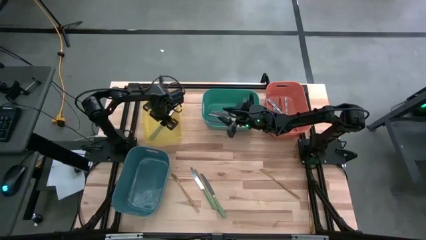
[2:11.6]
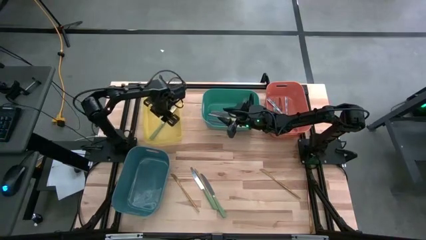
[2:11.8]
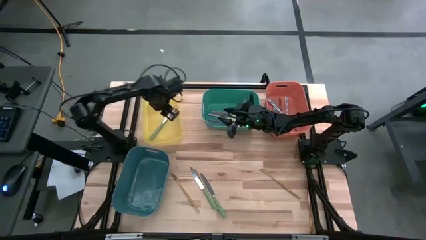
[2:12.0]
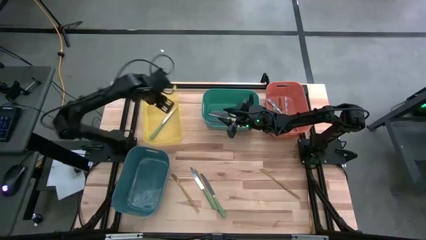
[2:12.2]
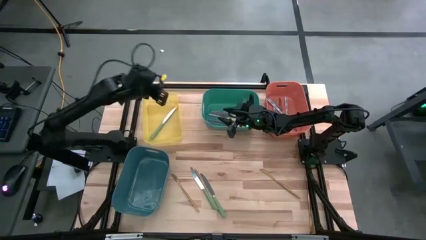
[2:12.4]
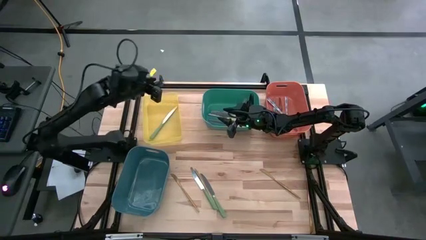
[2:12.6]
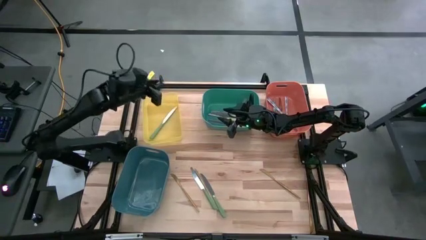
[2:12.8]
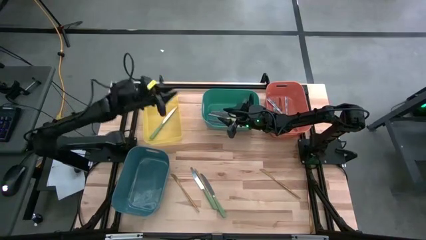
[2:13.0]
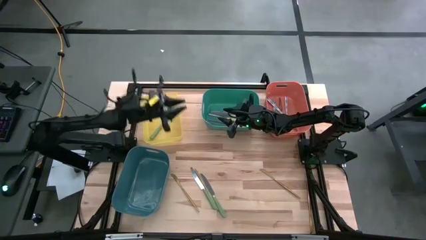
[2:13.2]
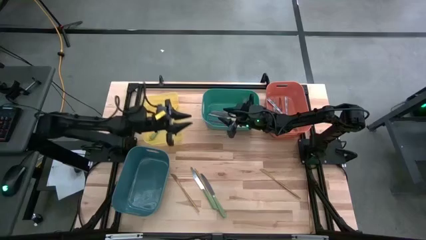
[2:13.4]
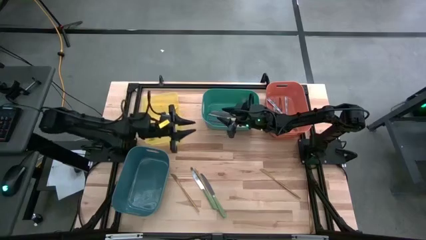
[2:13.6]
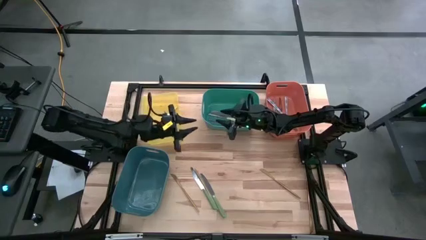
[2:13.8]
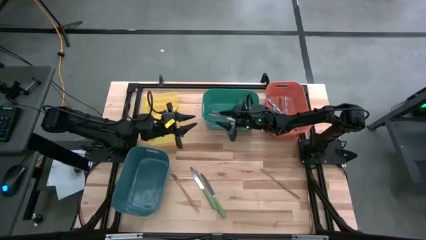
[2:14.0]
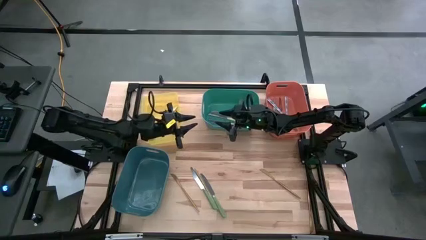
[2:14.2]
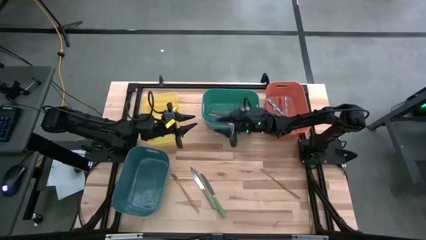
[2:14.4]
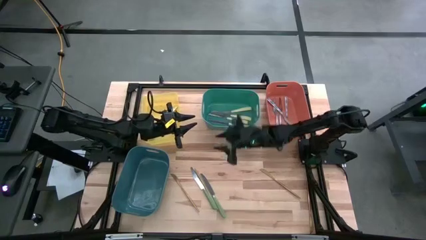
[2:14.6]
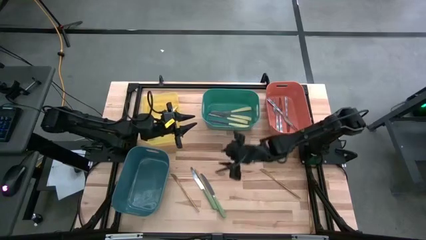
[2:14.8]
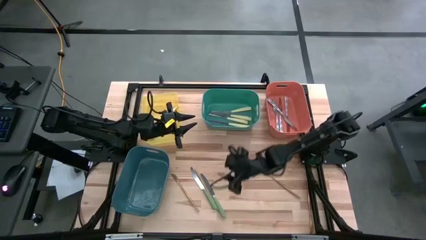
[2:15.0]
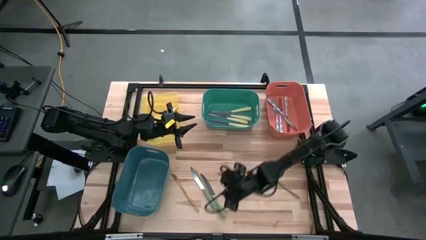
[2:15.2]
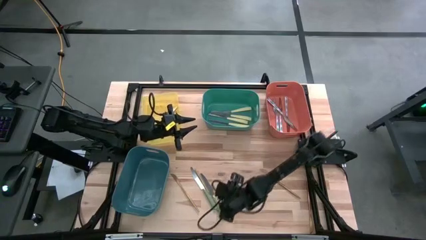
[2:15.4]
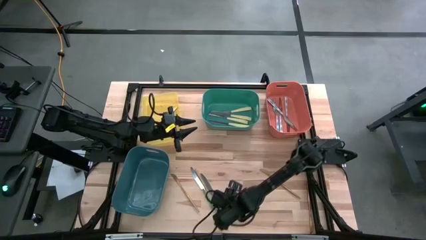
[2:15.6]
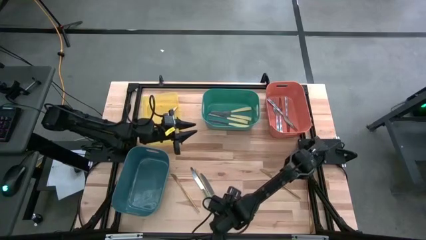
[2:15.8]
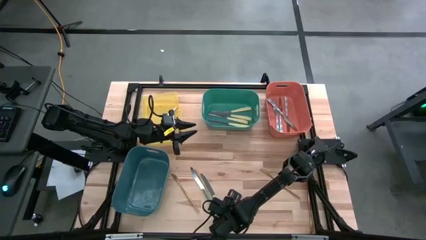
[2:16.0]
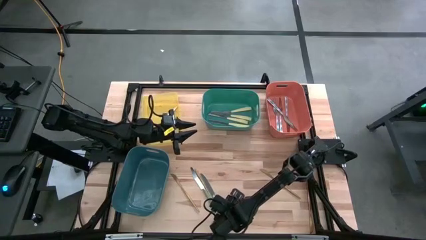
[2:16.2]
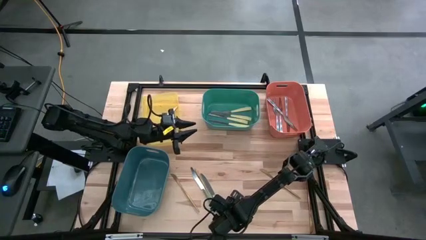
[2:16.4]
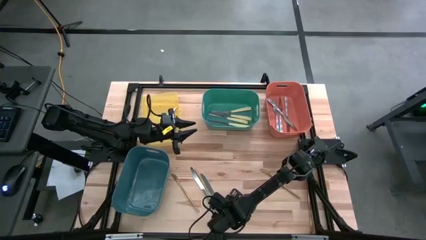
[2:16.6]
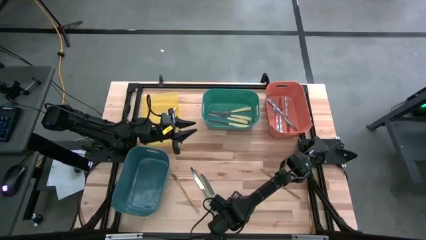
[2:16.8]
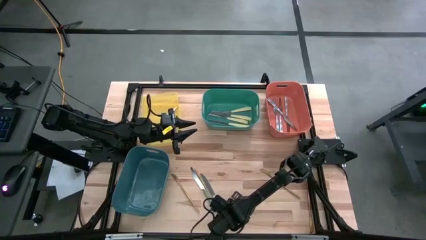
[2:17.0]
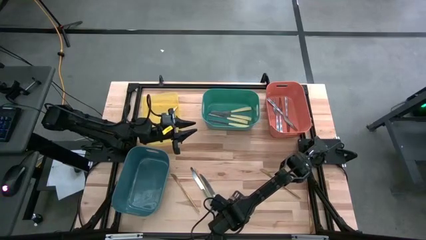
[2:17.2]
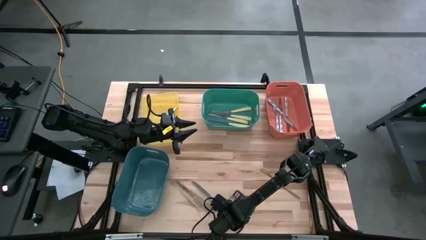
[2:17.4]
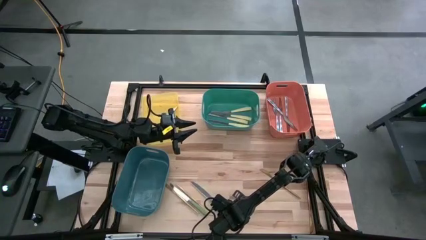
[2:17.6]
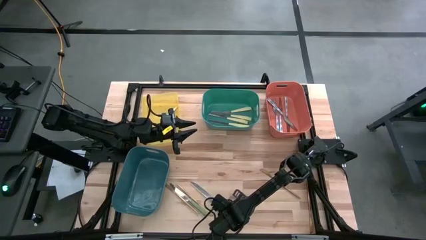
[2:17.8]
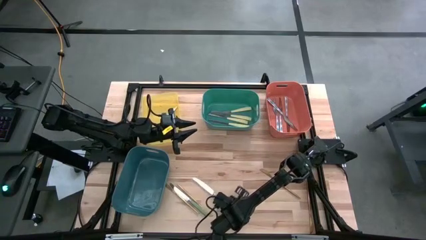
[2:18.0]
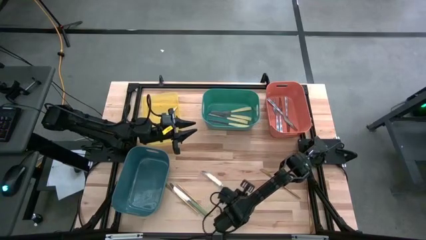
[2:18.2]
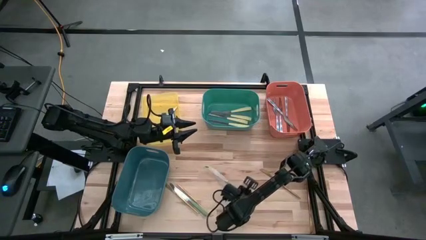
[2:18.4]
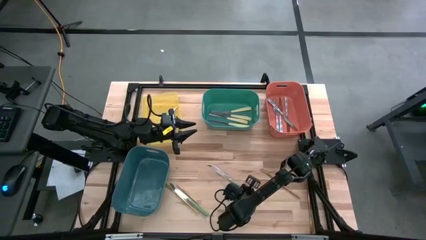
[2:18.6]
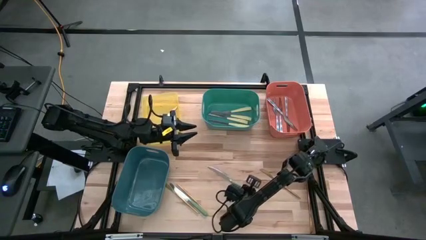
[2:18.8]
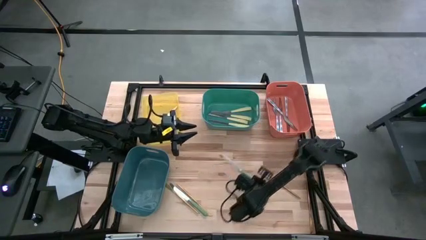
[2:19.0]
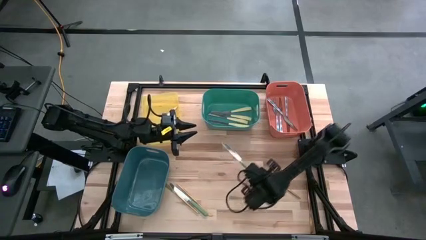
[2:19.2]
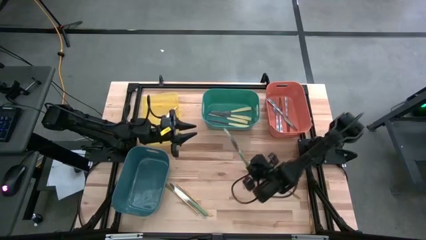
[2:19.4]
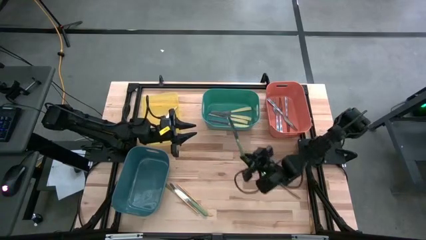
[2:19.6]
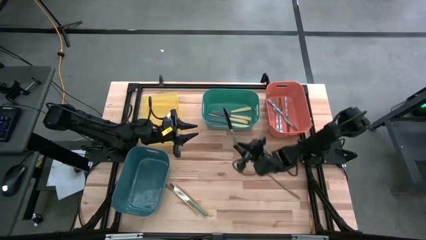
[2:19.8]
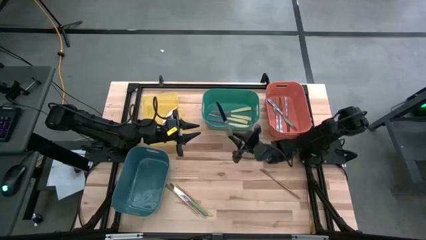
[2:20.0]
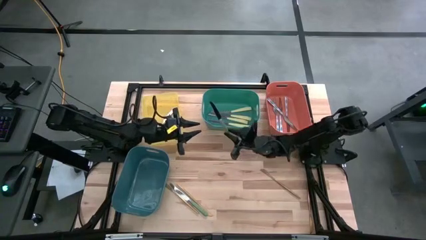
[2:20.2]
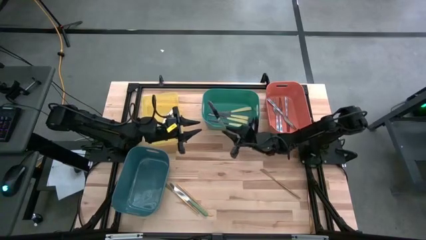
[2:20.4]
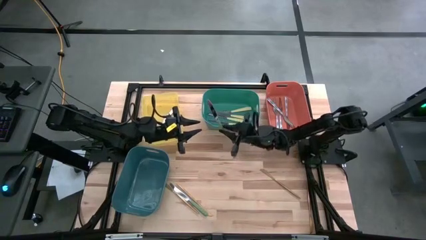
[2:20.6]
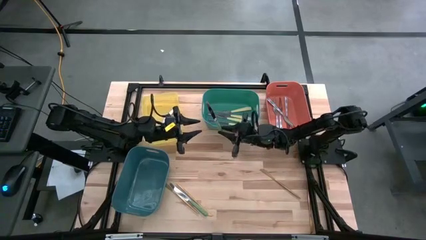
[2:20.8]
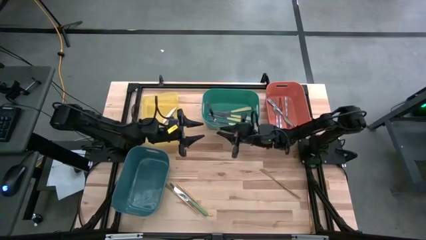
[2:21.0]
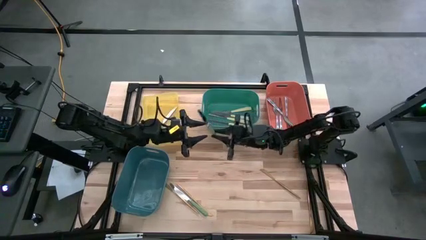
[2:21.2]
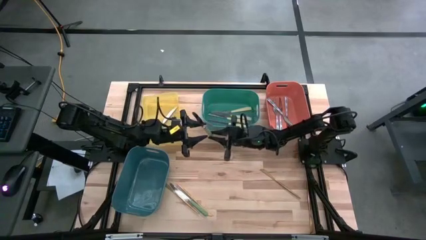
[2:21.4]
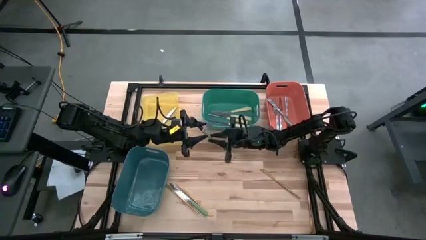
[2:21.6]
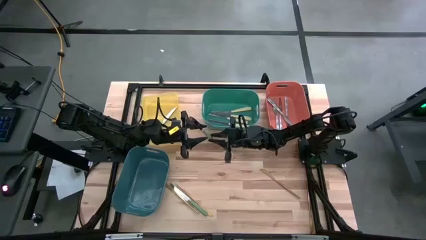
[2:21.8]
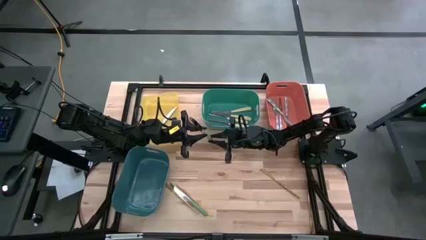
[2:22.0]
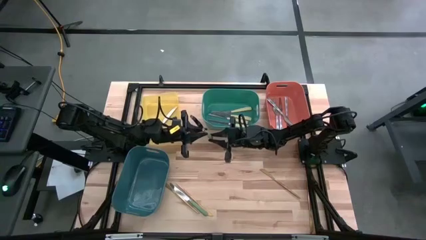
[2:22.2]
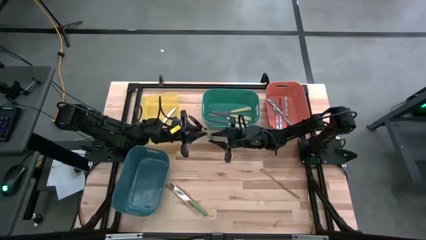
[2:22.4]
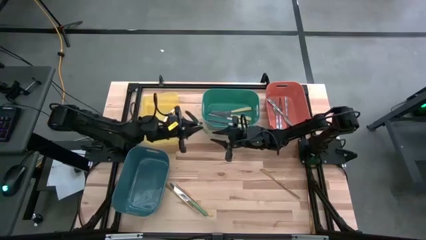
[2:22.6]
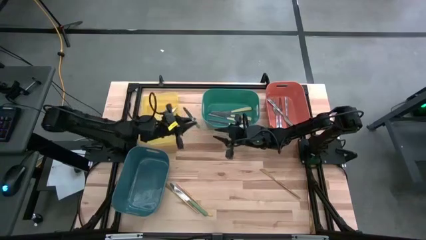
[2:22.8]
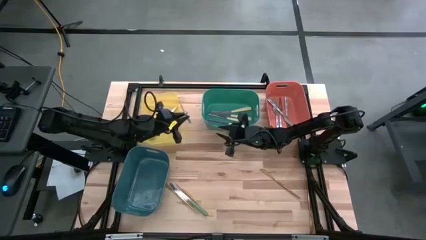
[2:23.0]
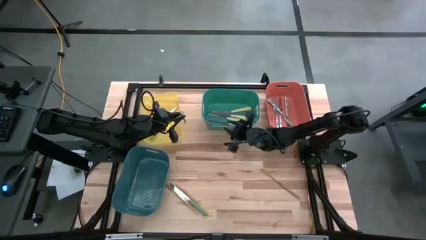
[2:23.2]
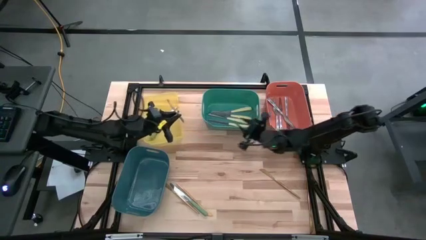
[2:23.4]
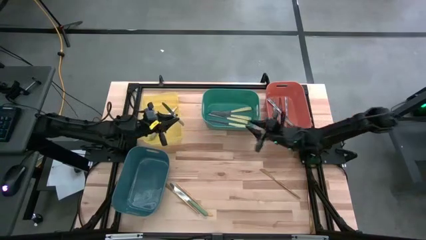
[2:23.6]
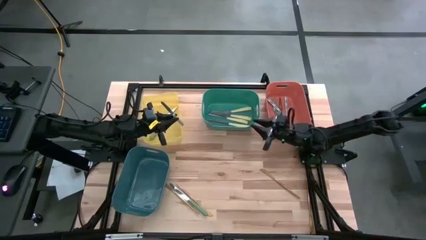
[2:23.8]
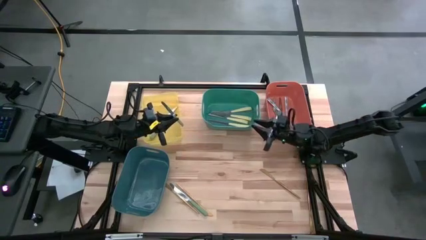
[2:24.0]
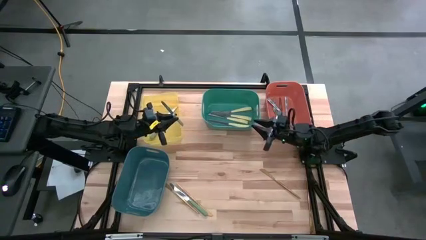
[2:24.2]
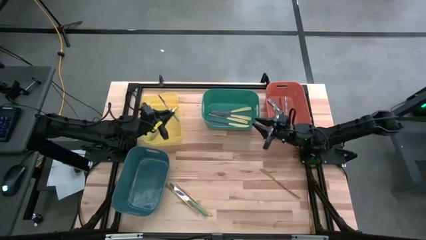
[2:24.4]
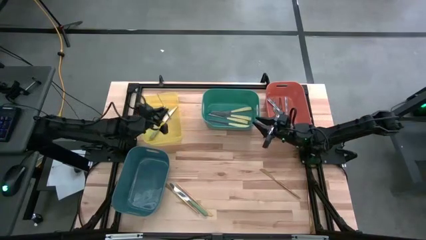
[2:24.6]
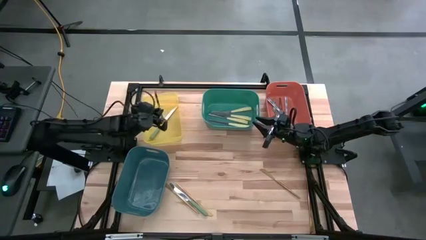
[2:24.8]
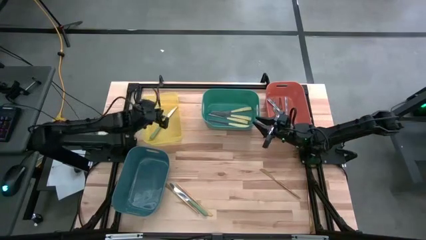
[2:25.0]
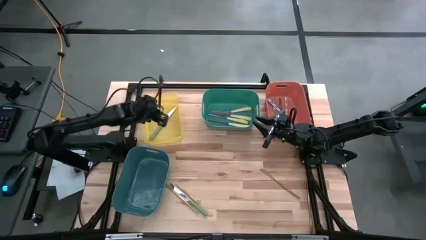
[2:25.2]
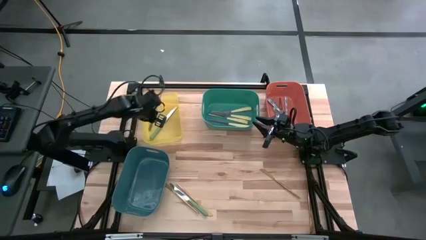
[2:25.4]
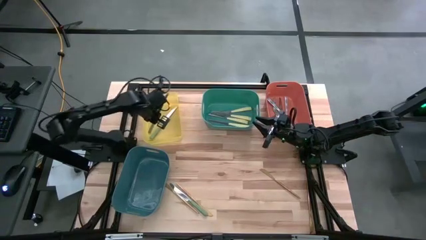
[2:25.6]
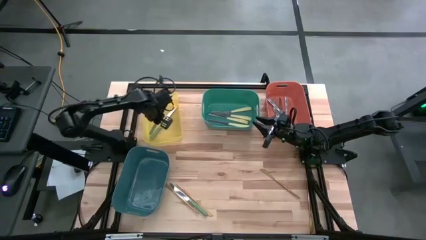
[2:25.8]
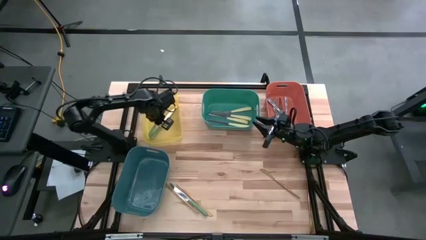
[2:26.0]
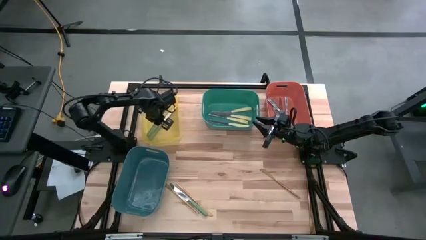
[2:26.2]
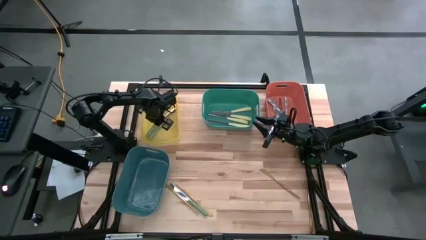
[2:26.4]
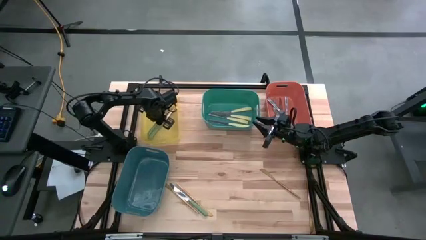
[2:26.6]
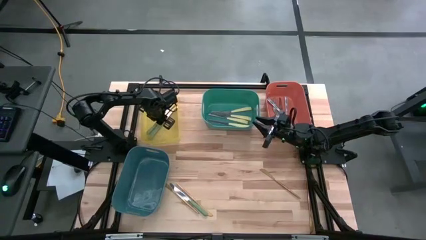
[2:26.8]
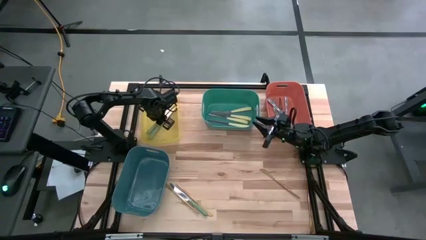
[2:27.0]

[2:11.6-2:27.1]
Task: Sort silverware by color (type)
Put the green knife into the yellow bin
